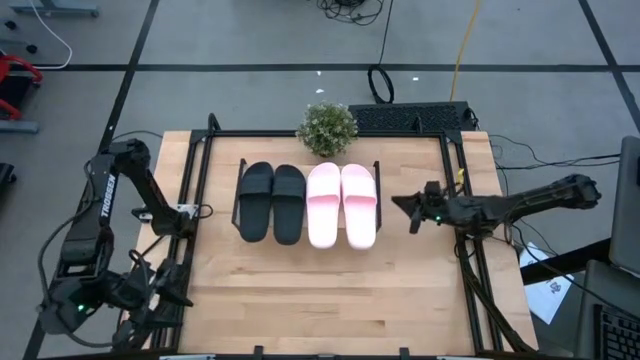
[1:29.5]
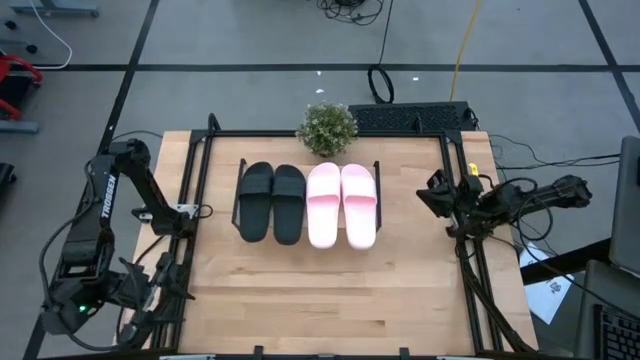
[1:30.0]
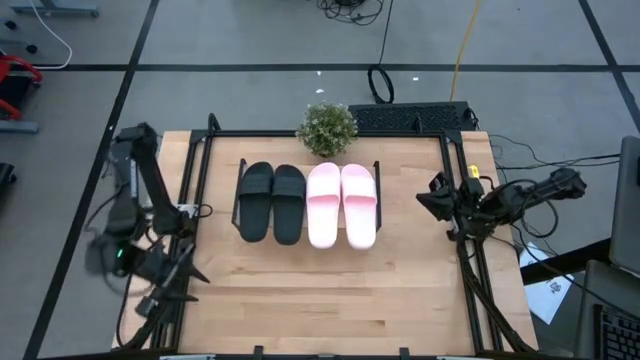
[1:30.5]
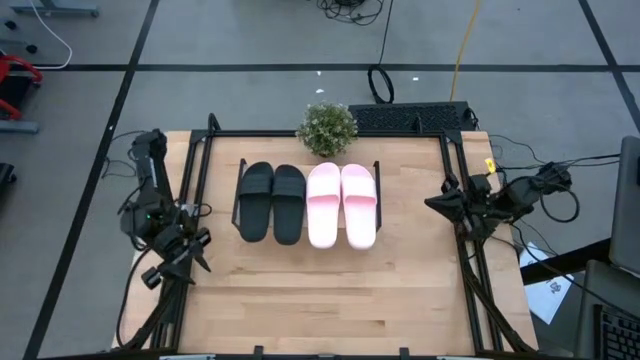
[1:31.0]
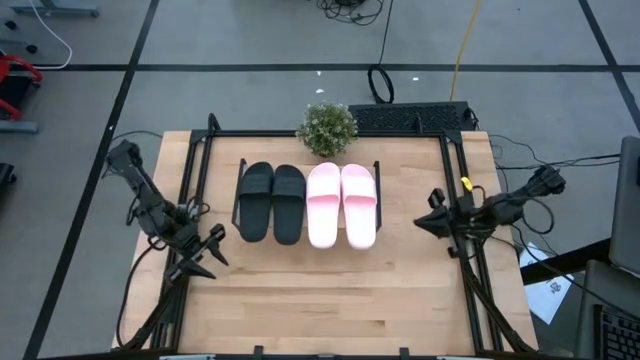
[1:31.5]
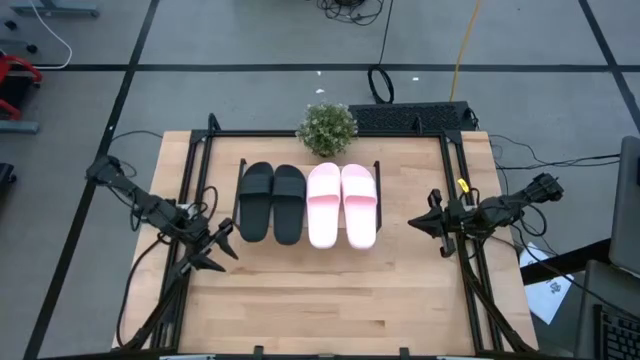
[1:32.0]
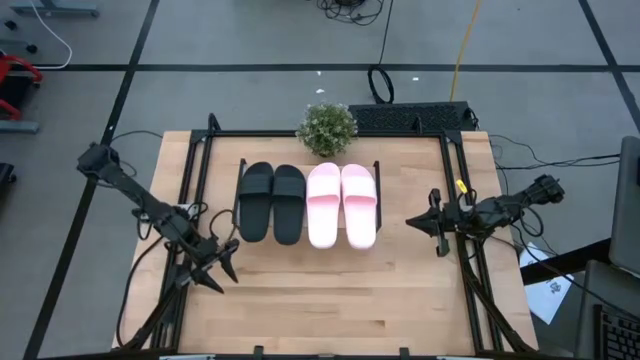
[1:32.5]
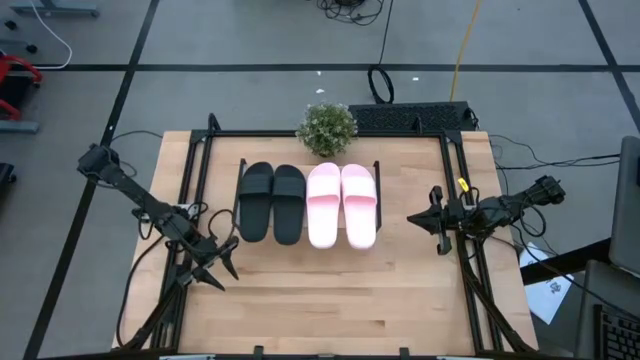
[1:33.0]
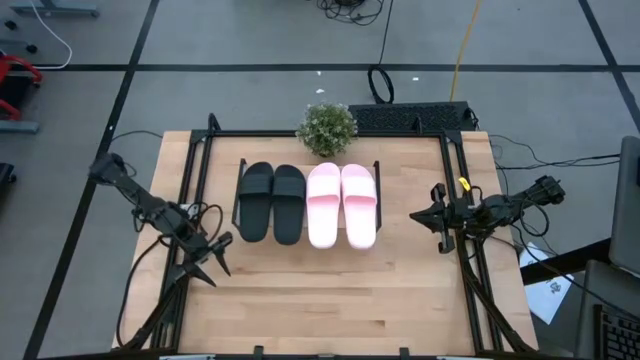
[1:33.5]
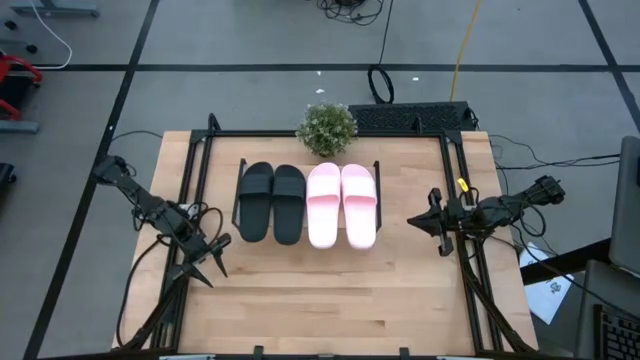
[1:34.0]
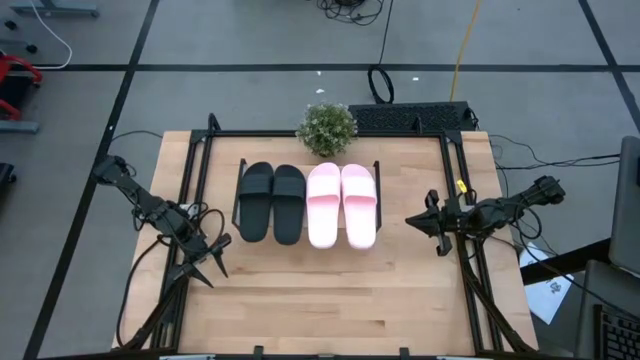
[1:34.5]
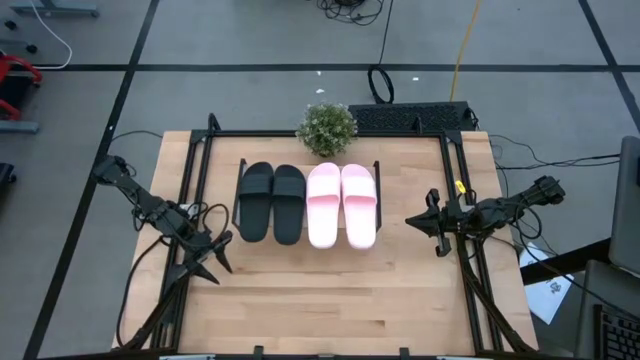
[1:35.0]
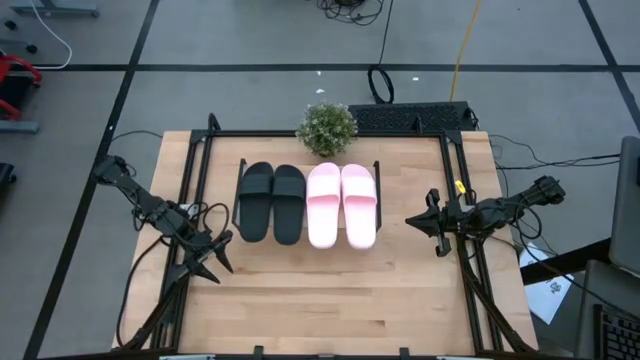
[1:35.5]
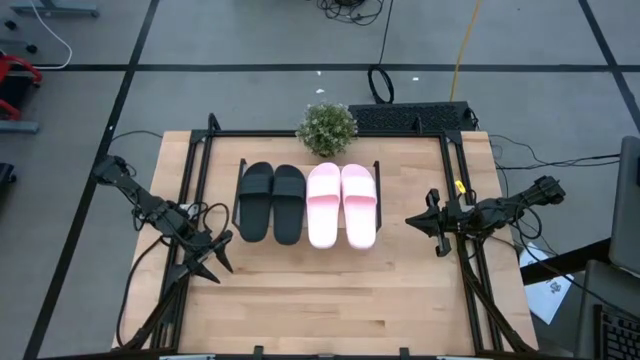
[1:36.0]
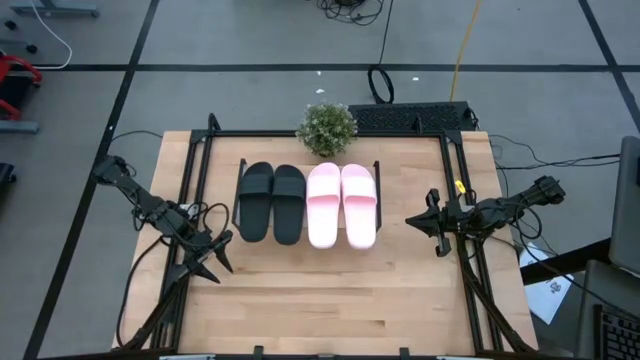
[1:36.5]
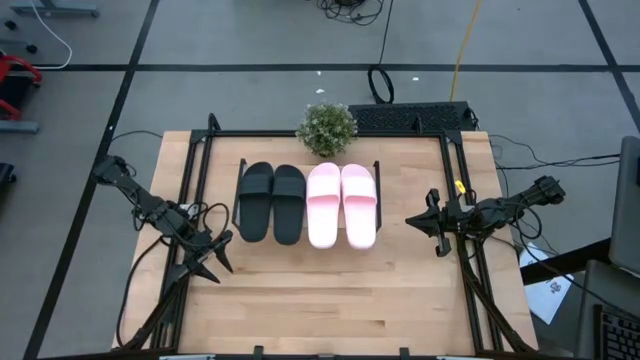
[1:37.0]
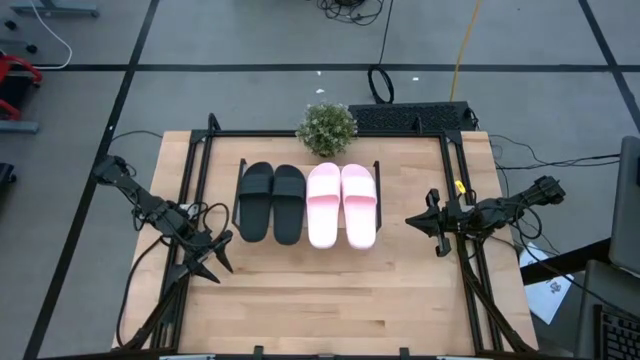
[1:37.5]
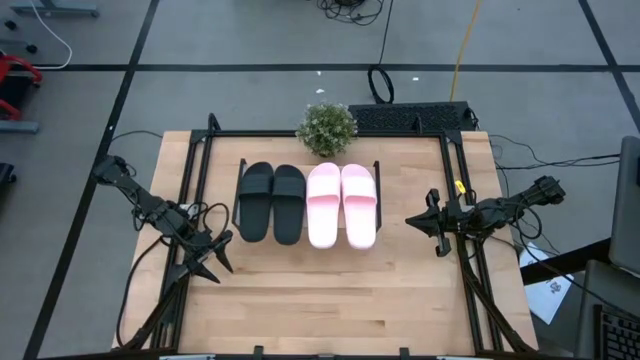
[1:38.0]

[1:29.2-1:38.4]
Task: Pick and place slides into the shelf
Return to Home Position

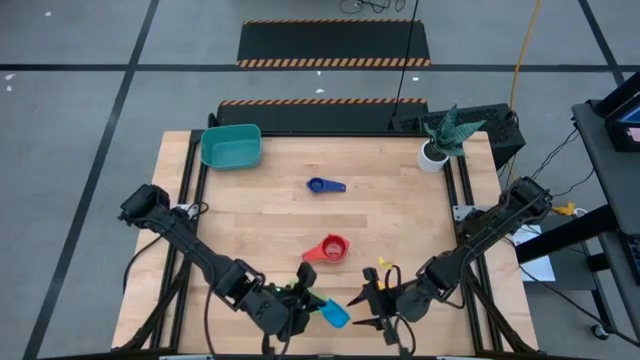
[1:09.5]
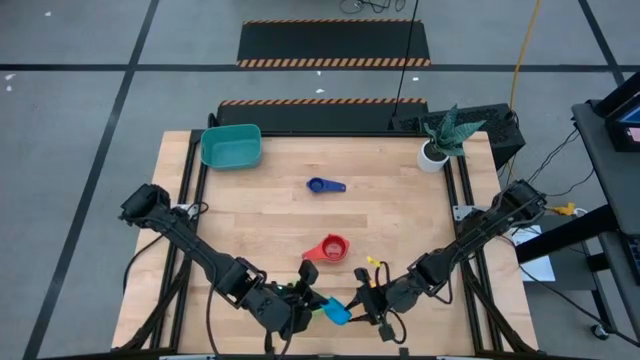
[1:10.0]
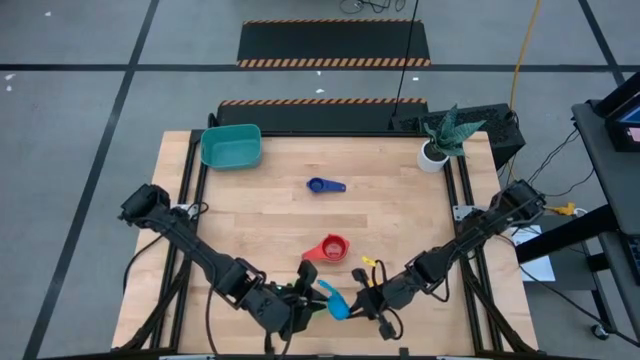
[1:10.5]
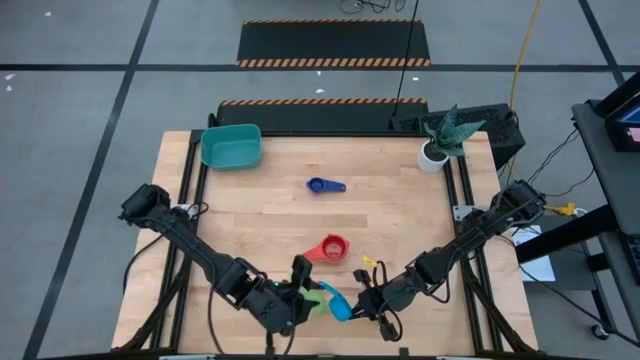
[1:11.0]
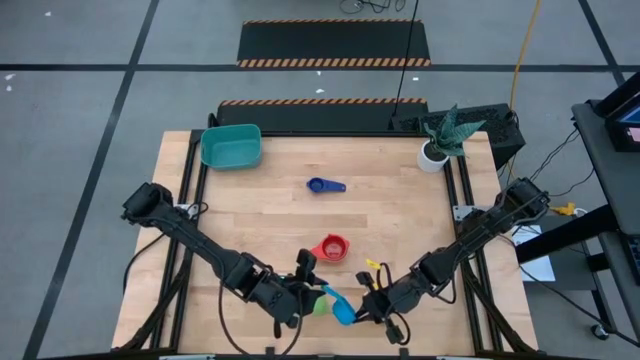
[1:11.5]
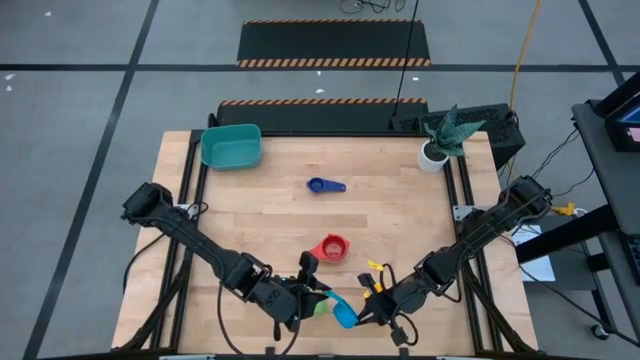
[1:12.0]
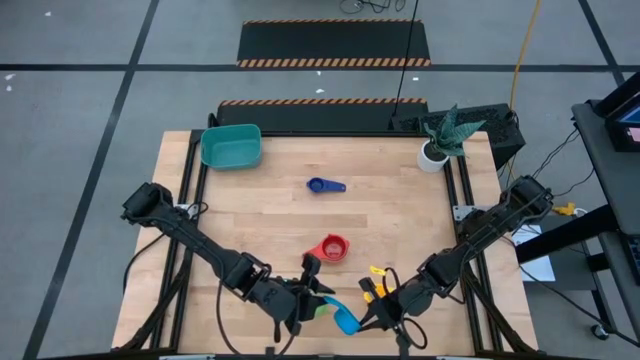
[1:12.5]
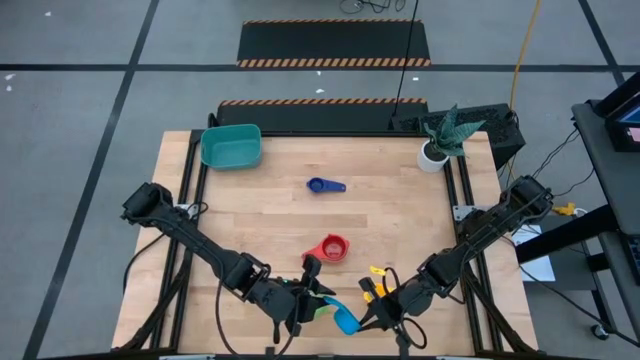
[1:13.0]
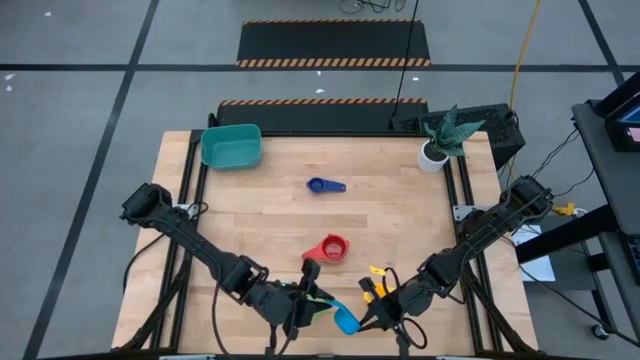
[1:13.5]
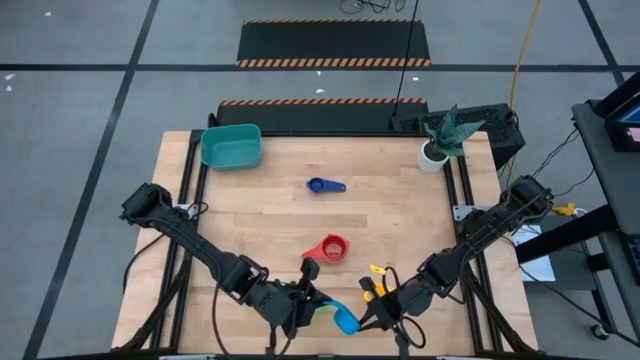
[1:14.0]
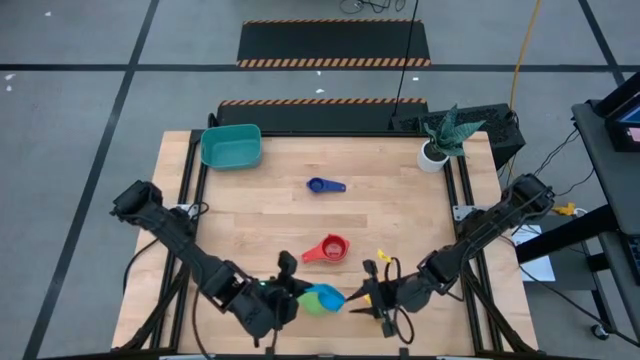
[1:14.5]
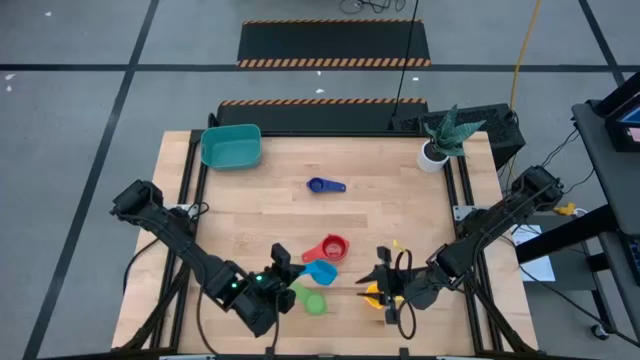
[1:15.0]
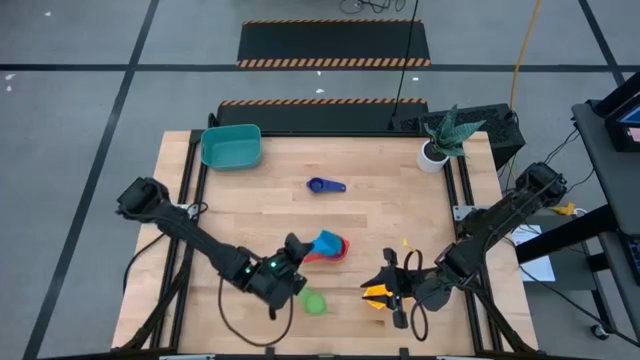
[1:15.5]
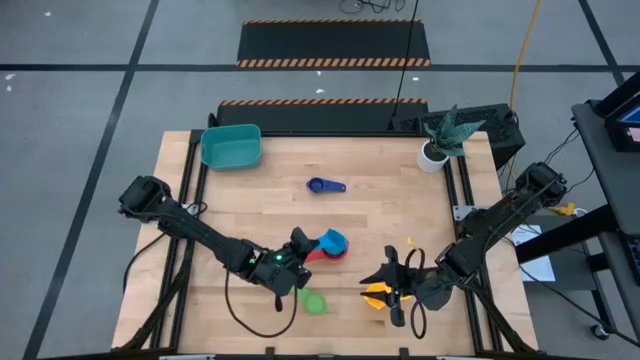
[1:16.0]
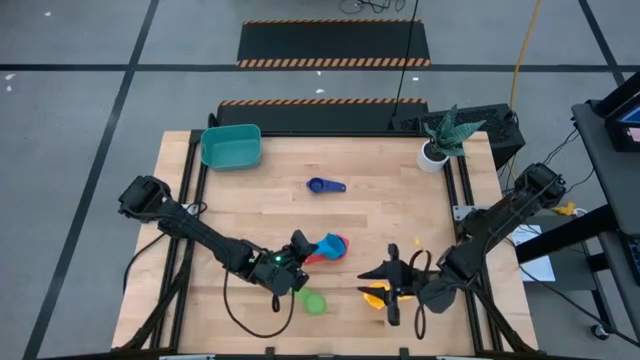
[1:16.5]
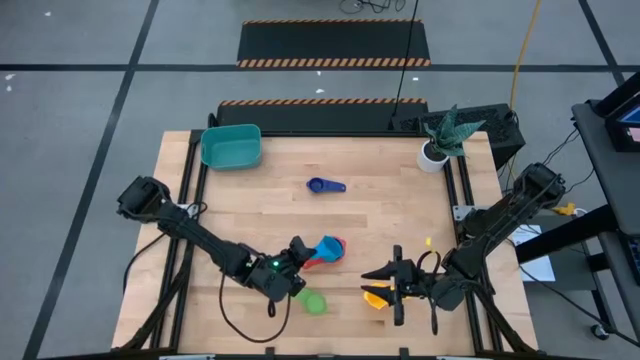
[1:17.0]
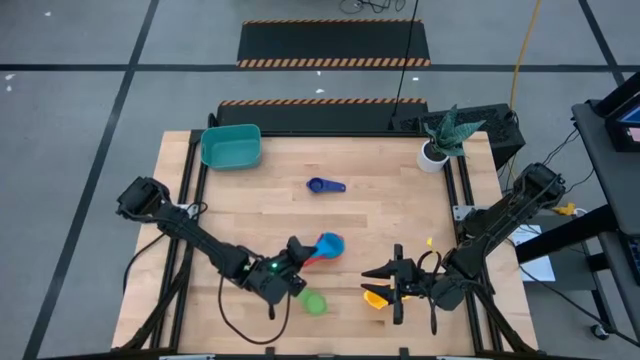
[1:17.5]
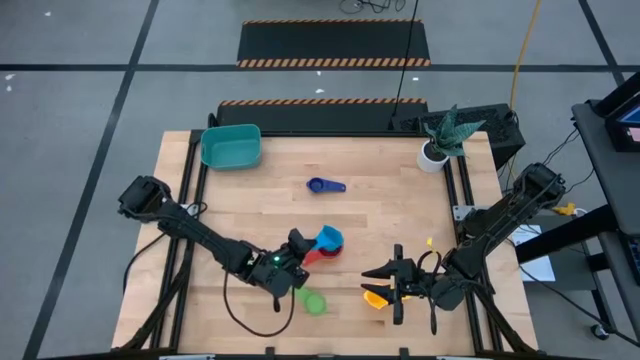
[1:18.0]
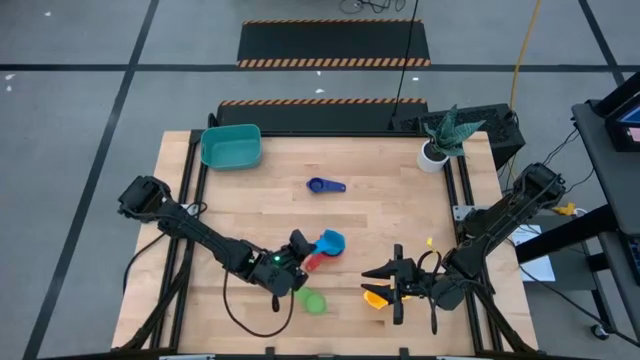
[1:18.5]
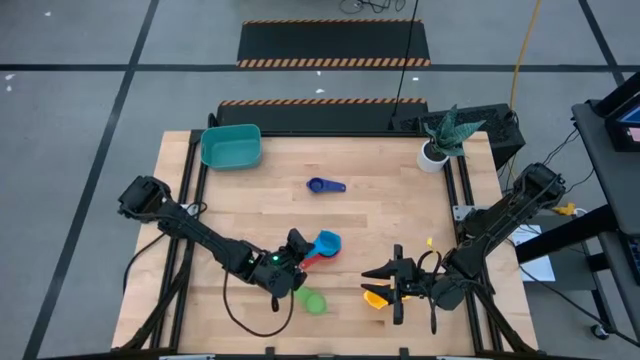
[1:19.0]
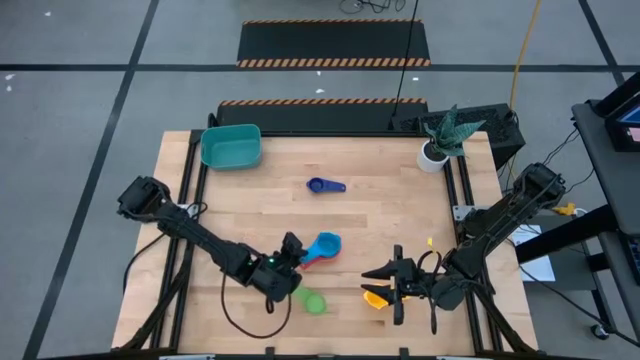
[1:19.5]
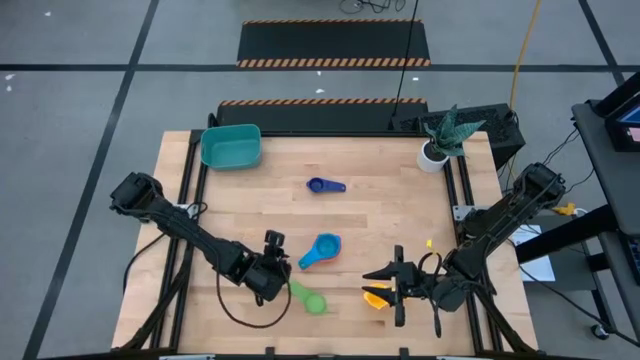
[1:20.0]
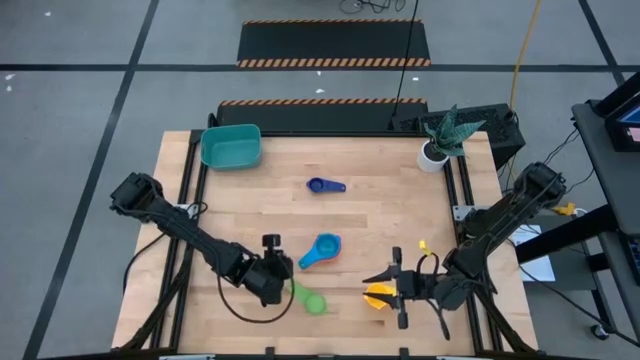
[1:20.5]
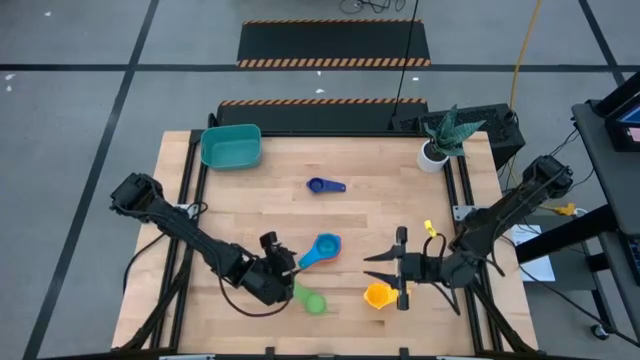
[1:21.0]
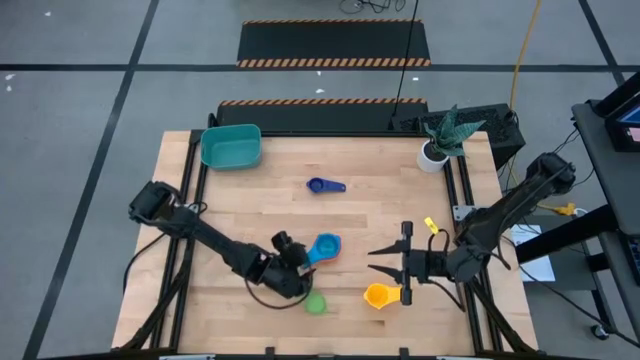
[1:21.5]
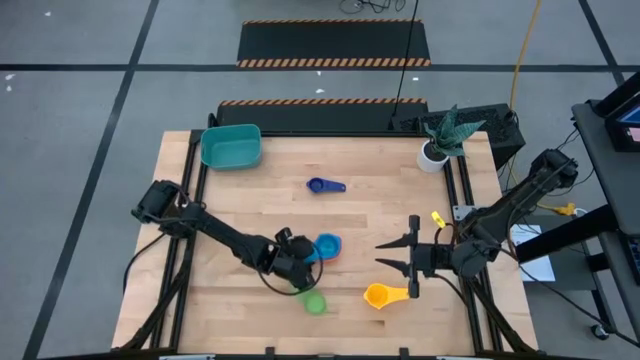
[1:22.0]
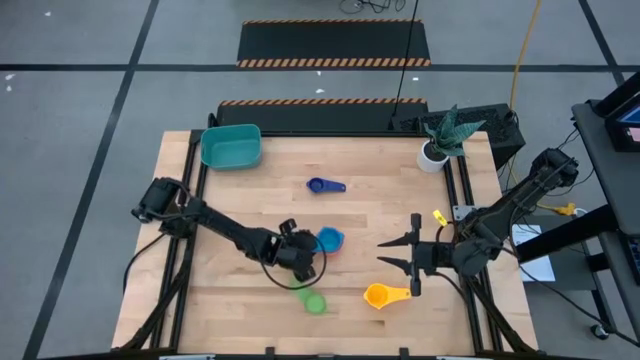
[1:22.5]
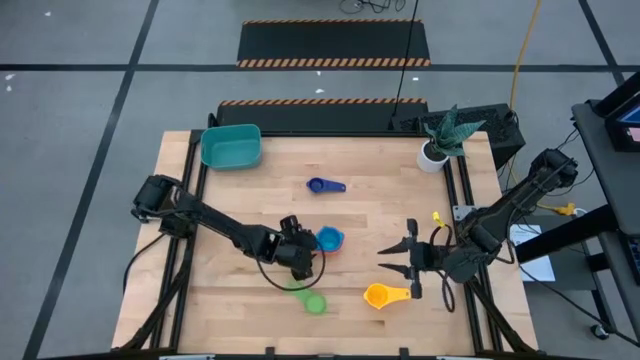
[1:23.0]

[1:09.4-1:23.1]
Task: Nest measuring cups in basket
Stack the light blue measuring cup on top of the red measuring cup
